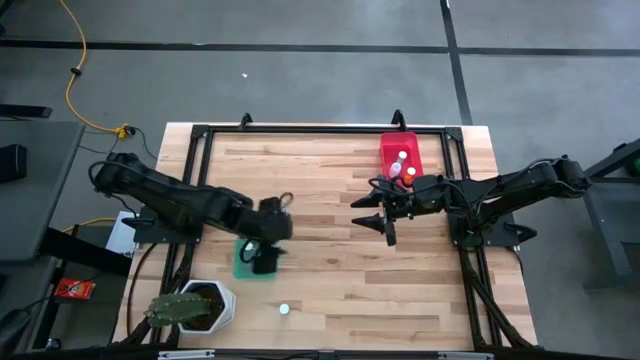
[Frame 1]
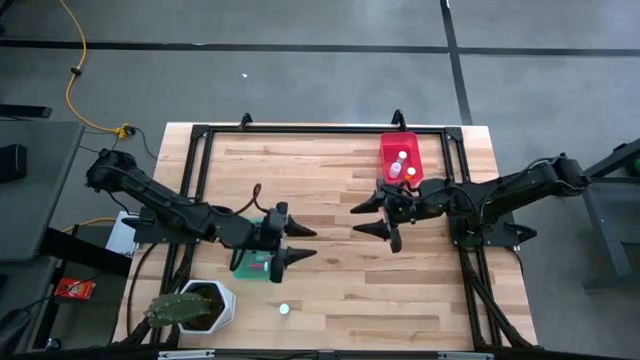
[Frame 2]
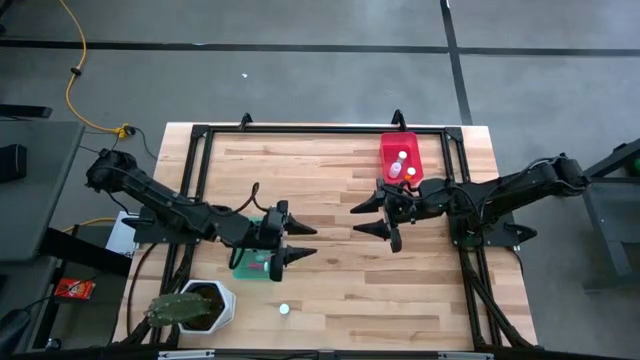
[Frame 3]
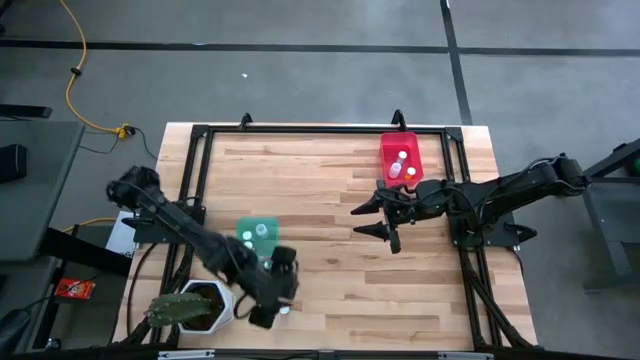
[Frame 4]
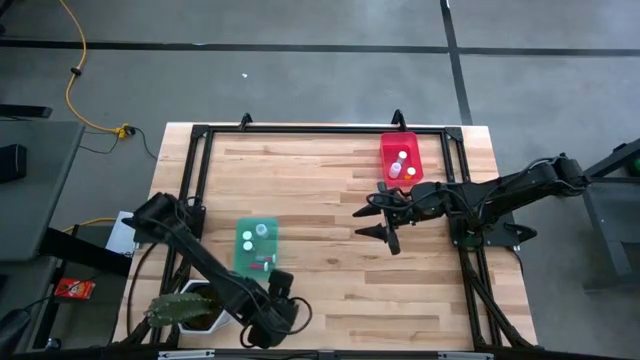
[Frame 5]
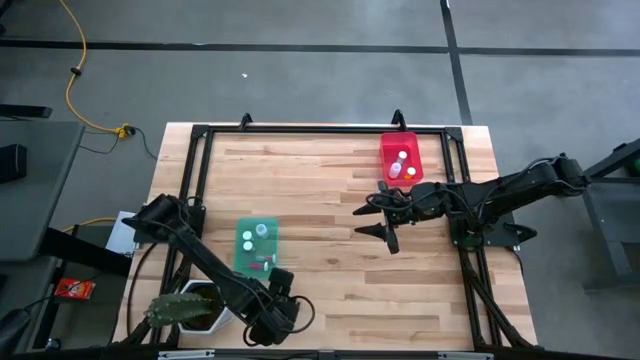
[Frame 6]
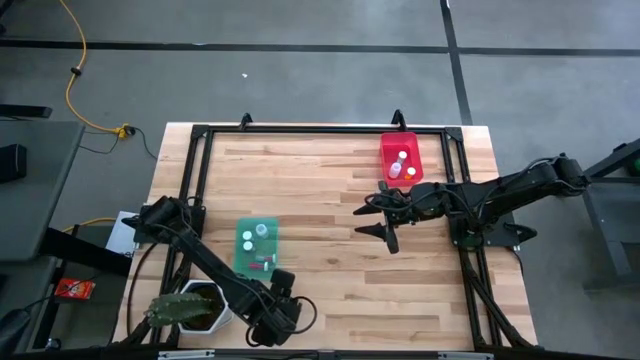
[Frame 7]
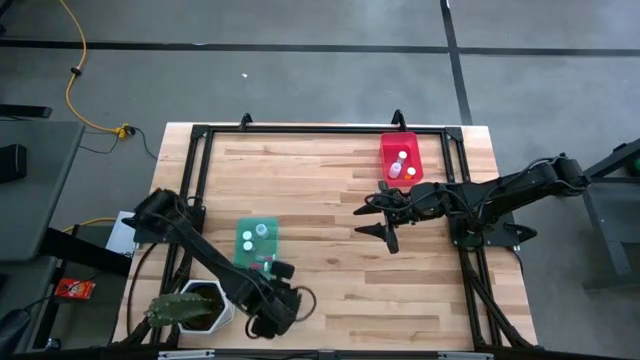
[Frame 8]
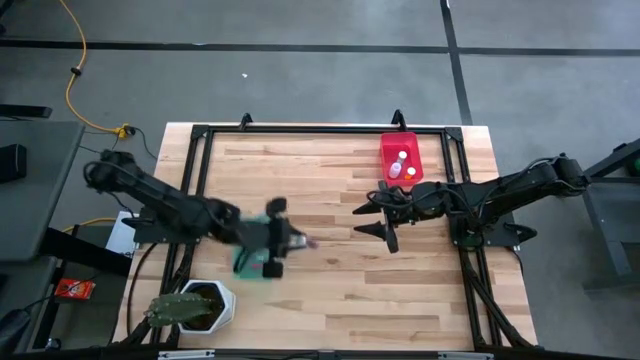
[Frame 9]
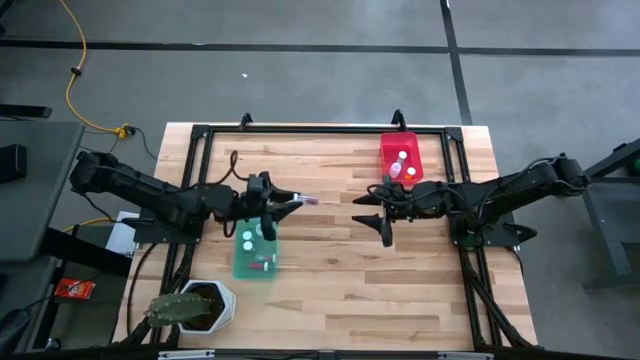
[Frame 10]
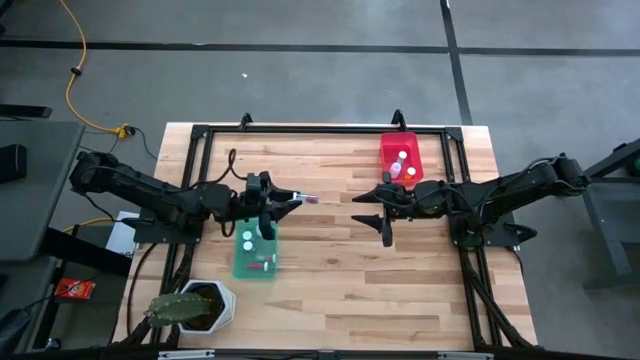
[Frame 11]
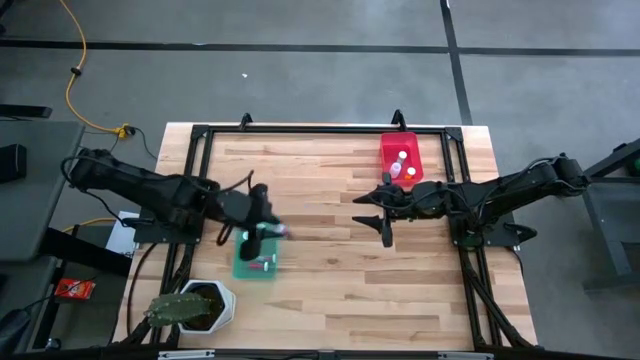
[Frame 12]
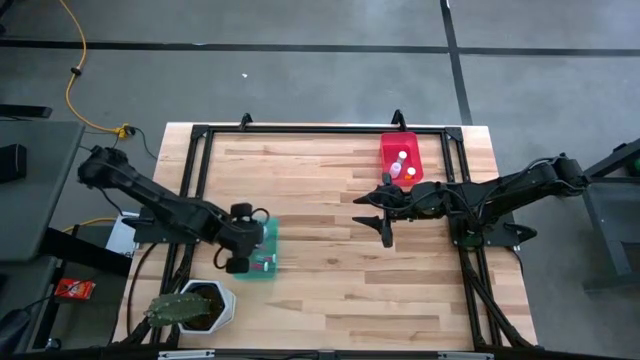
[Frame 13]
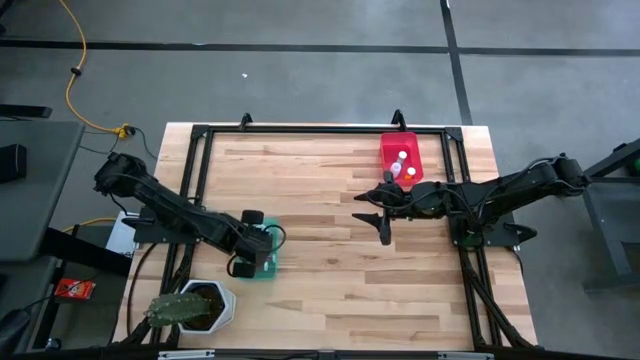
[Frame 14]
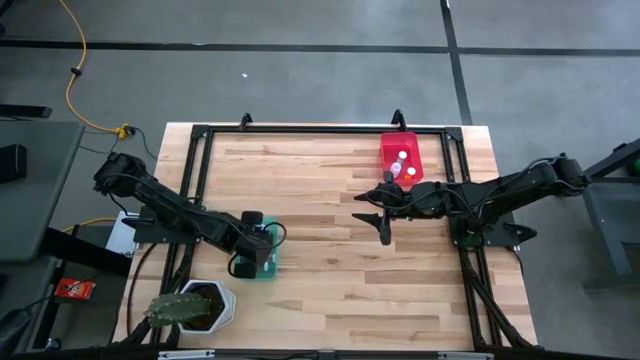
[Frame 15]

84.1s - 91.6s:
Task: Pick and place medicine bottles into bin by pill shape (circle, oval)
Put the blue capsule bottle into the blue bin

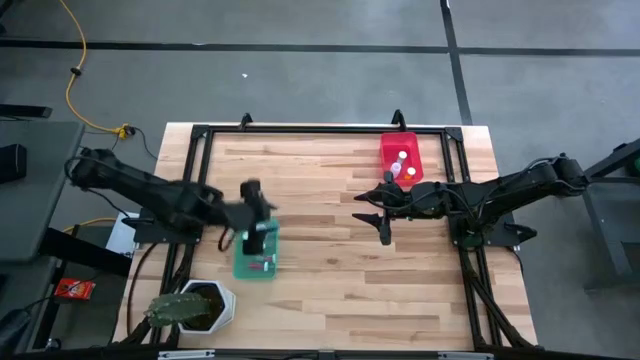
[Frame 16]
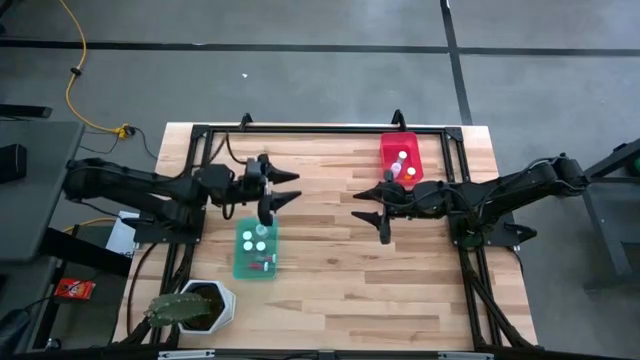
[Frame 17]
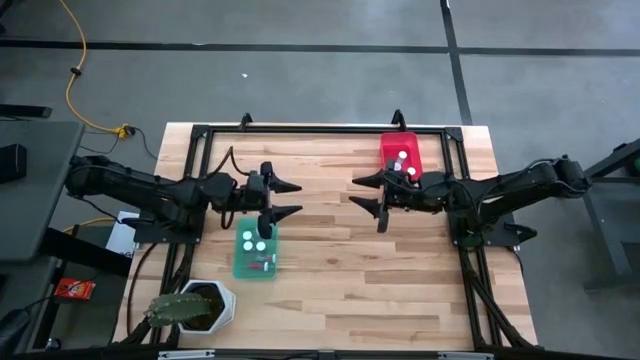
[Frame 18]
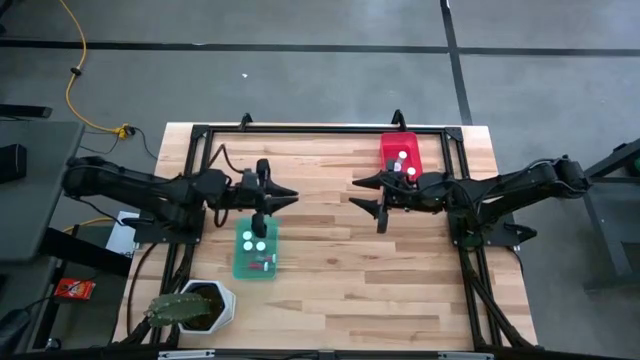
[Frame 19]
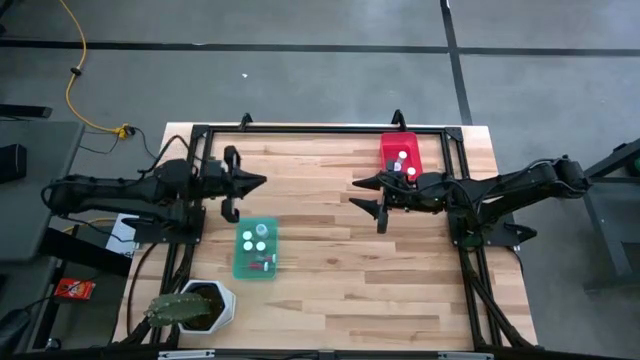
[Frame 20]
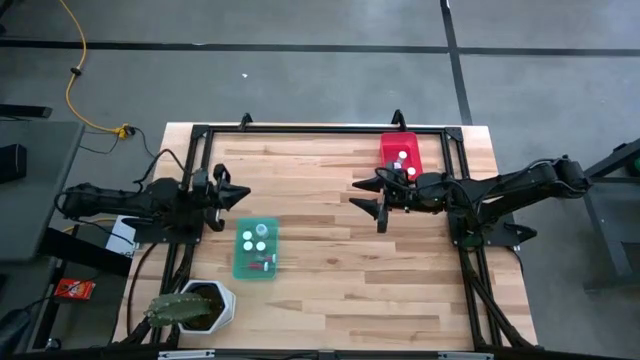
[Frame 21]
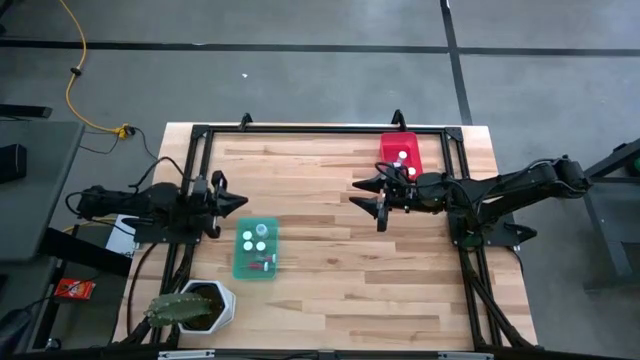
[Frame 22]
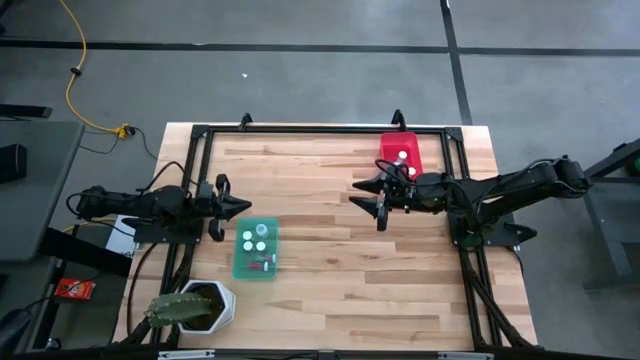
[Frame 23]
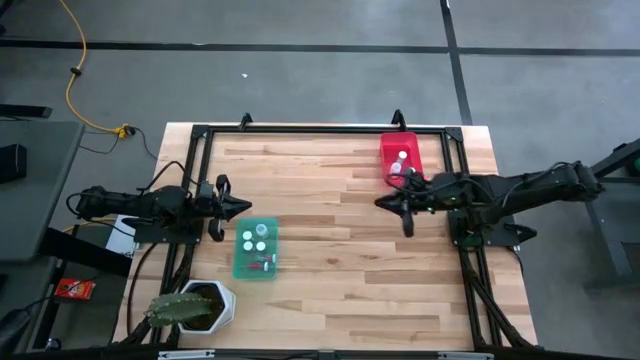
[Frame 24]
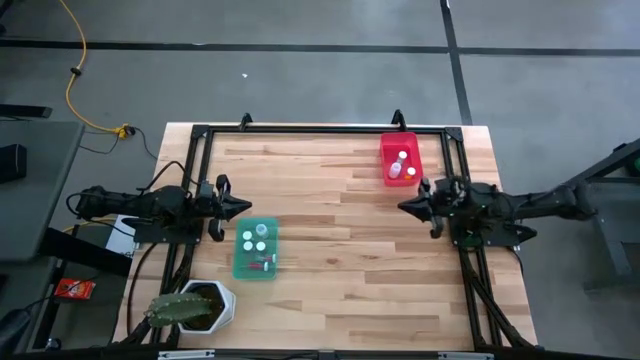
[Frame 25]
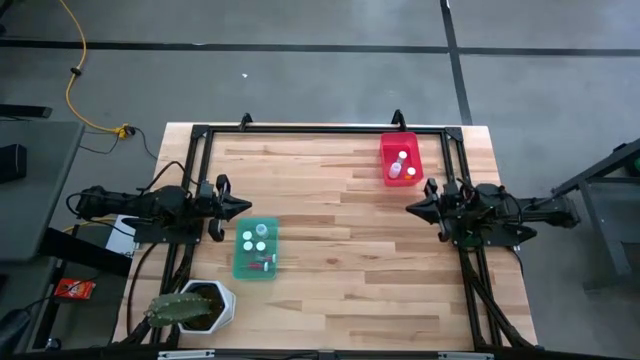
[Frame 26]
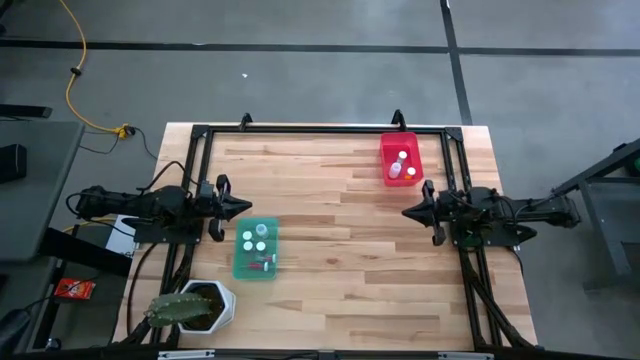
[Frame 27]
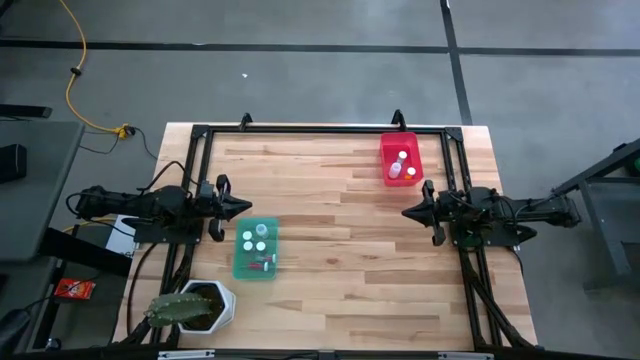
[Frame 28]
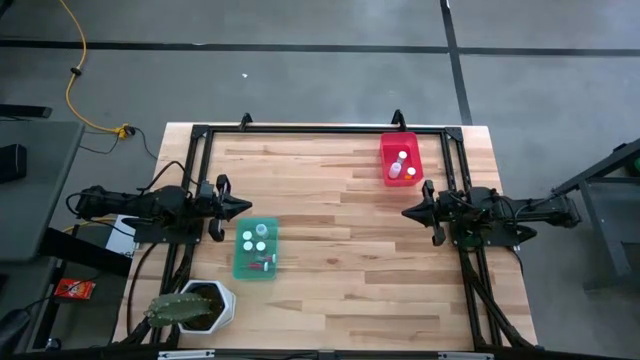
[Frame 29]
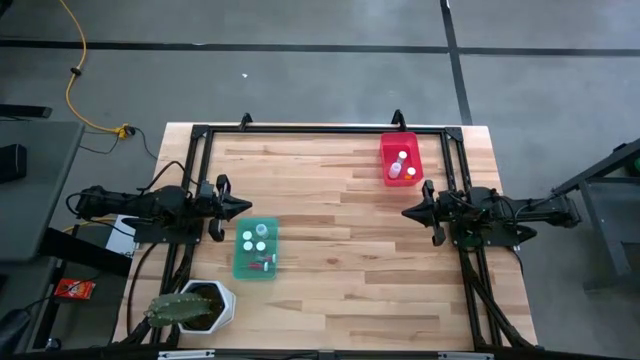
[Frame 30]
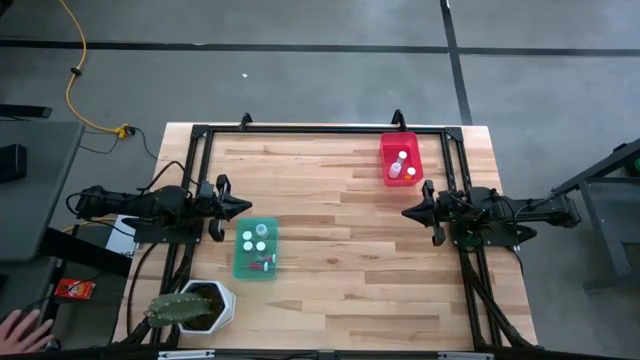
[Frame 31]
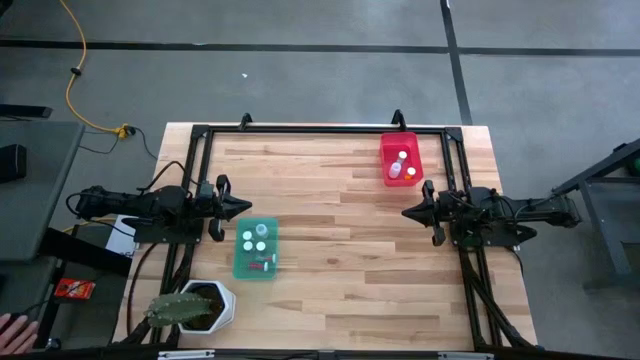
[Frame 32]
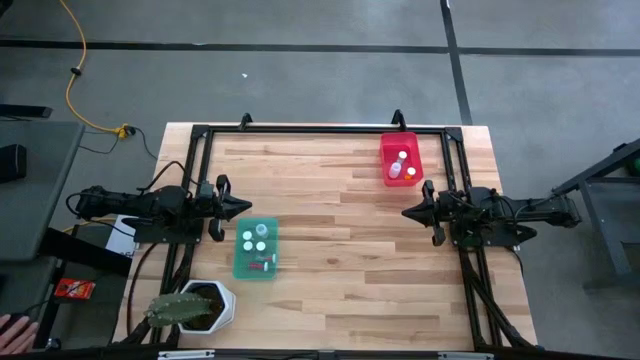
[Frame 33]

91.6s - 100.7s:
Return to Home Position

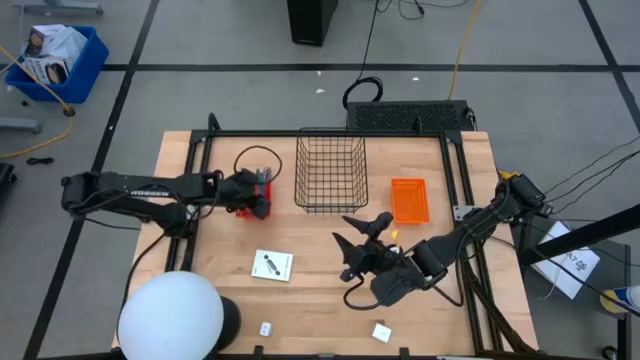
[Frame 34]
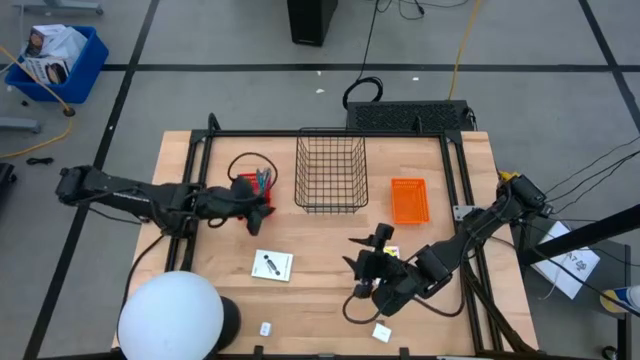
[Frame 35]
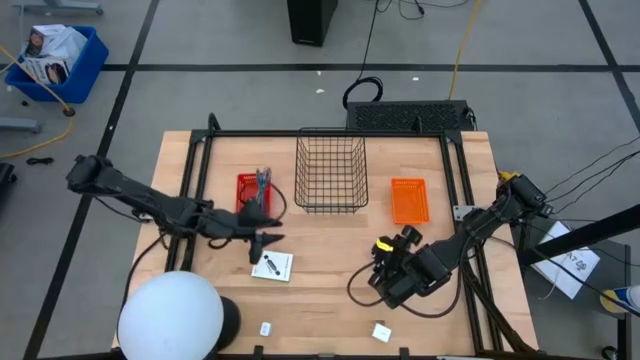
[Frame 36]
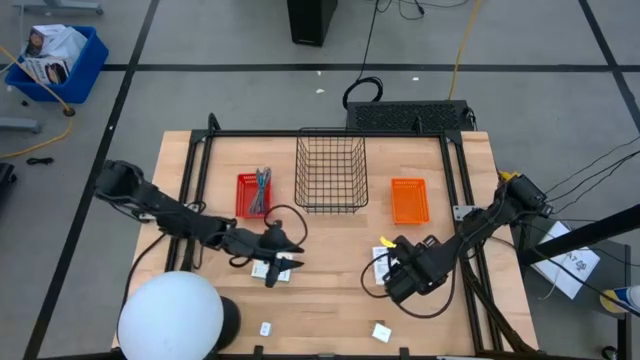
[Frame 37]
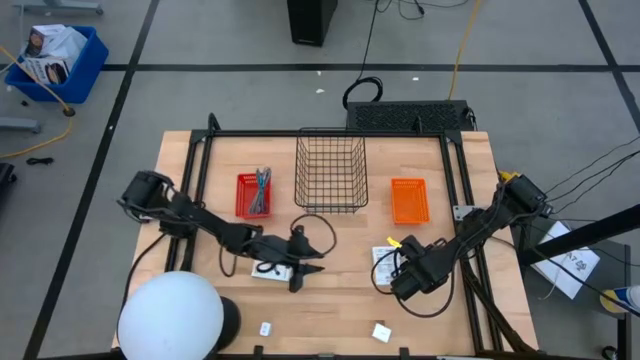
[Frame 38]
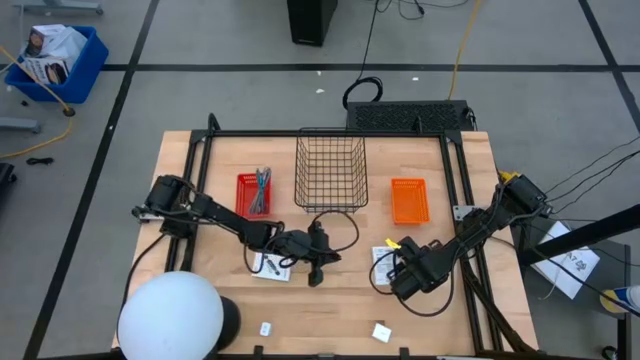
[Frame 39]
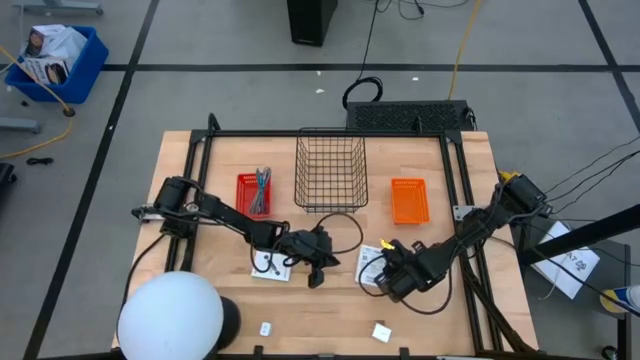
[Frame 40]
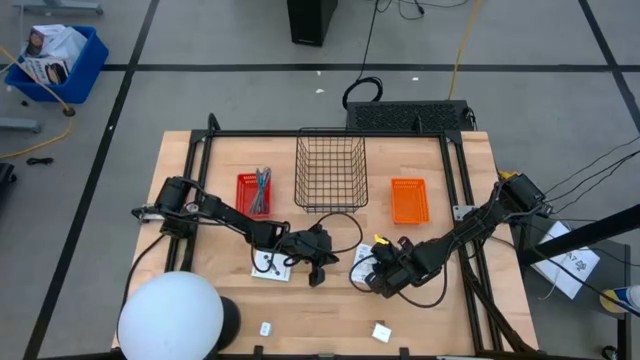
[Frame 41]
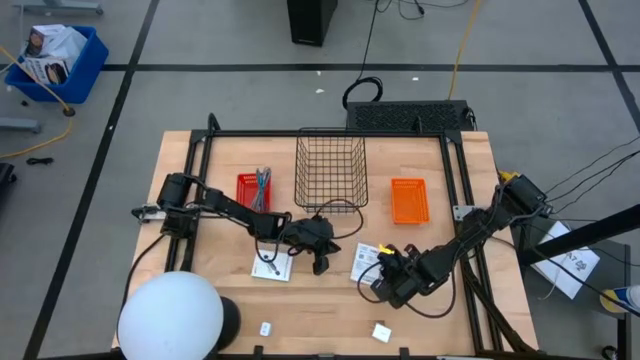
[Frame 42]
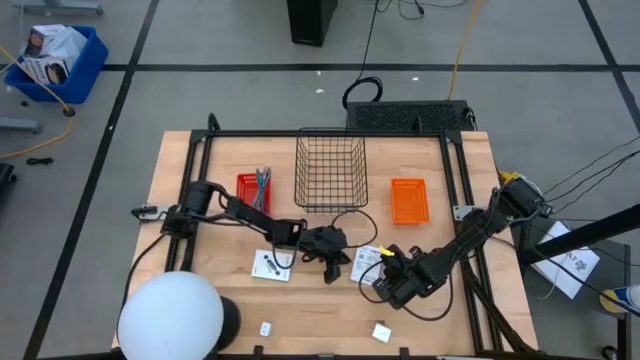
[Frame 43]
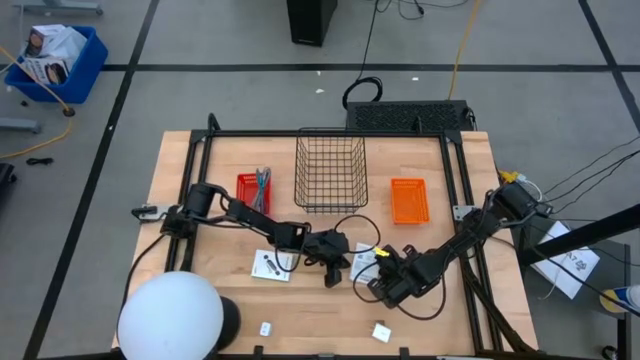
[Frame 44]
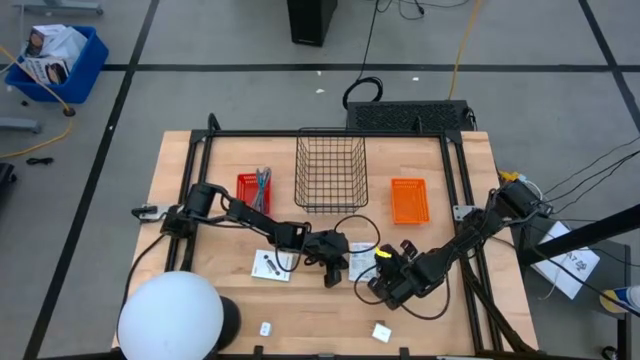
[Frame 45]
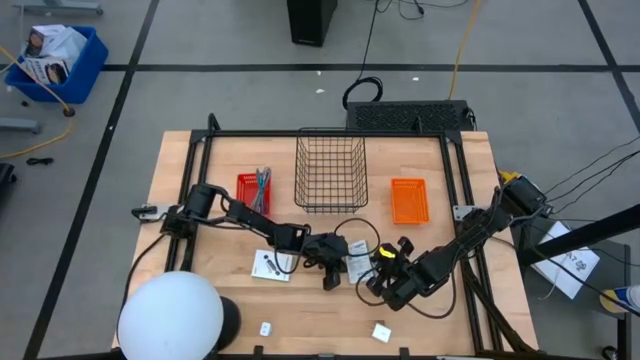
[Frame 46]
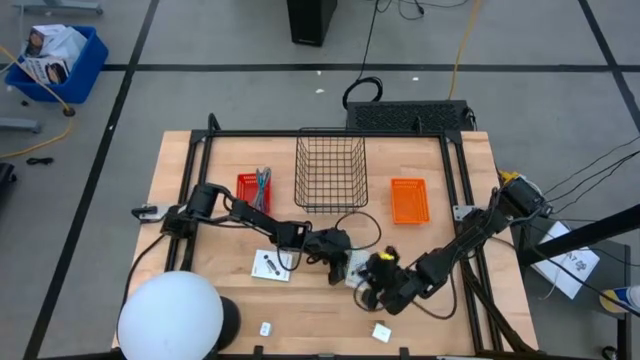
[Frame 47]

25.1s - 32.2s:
Task: Pick and place items into bin
Put the right card reader box into the orange basket
